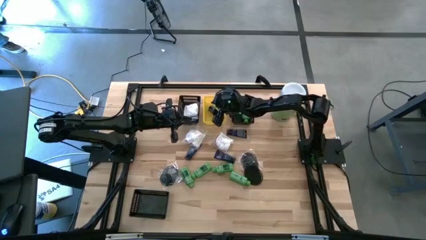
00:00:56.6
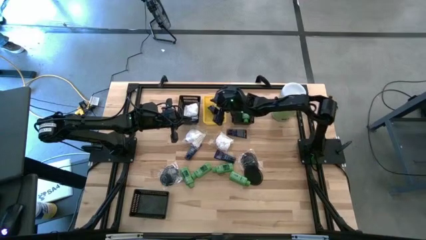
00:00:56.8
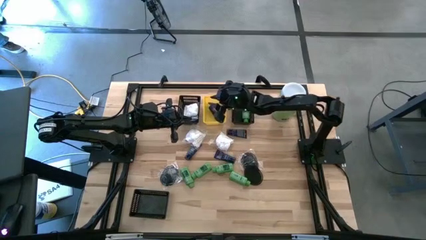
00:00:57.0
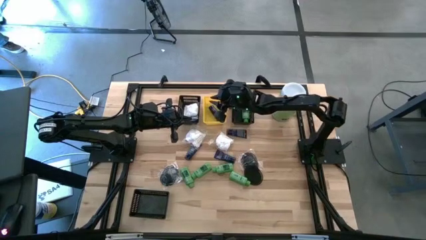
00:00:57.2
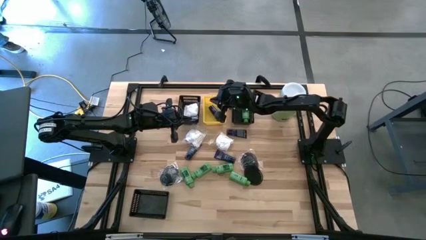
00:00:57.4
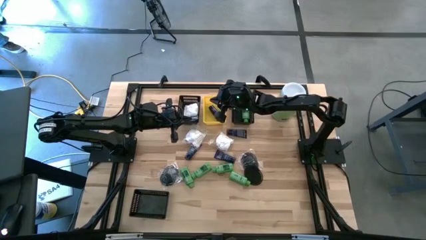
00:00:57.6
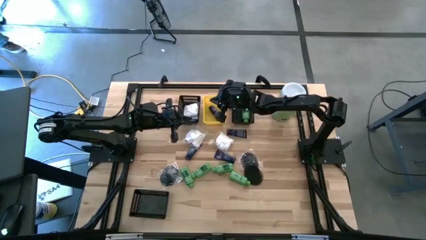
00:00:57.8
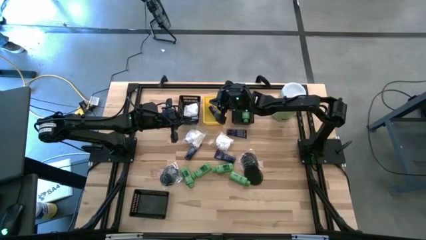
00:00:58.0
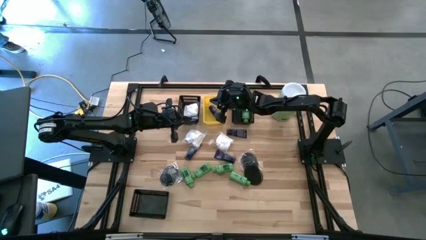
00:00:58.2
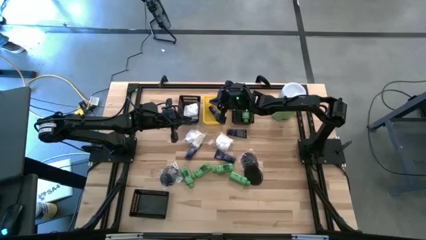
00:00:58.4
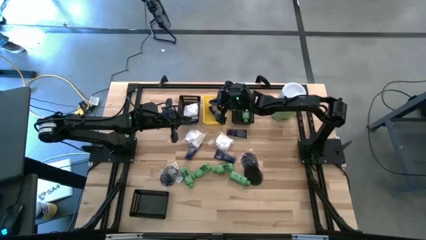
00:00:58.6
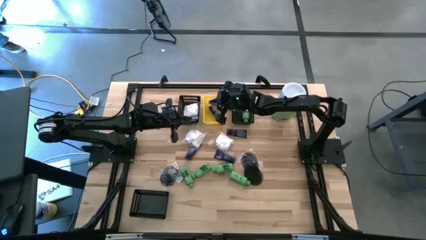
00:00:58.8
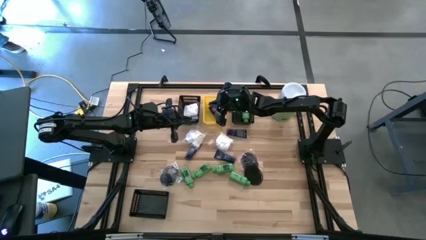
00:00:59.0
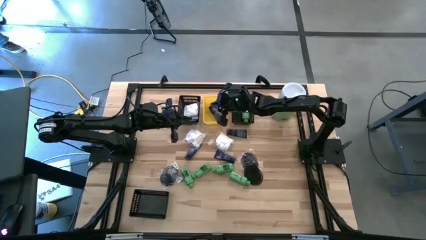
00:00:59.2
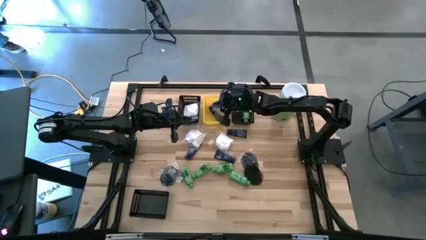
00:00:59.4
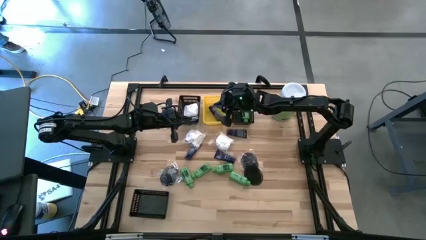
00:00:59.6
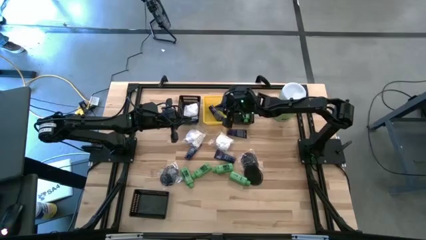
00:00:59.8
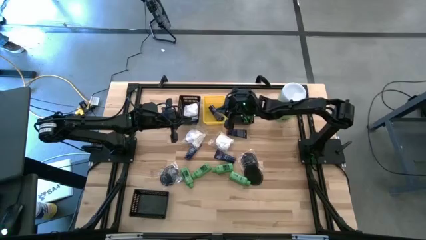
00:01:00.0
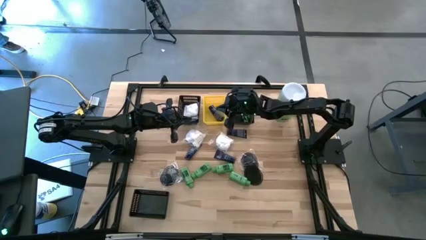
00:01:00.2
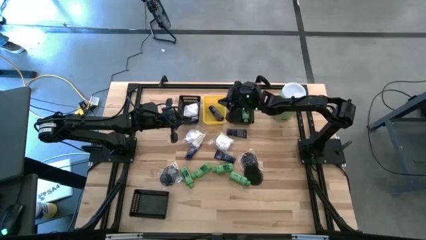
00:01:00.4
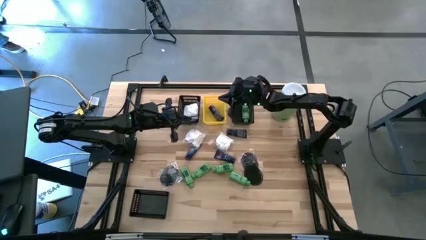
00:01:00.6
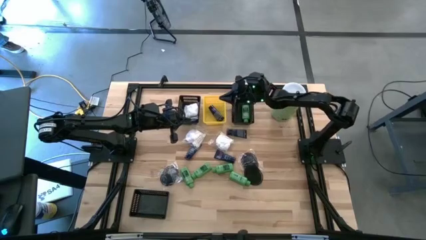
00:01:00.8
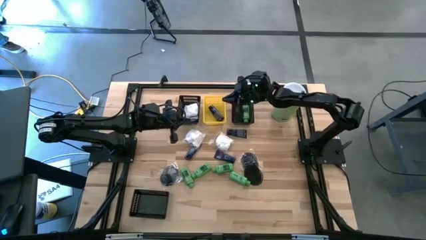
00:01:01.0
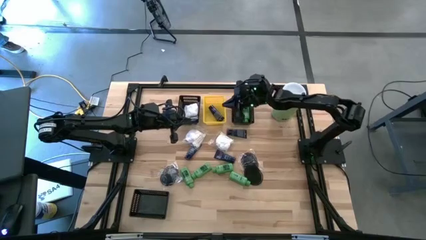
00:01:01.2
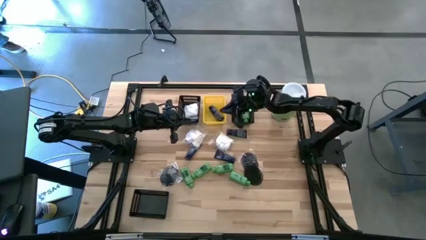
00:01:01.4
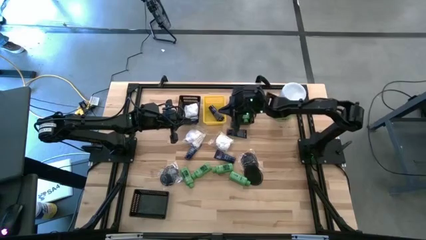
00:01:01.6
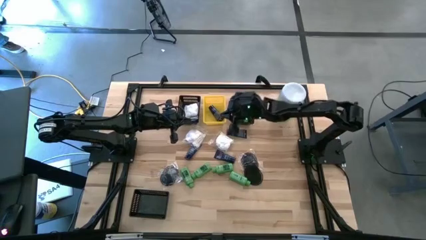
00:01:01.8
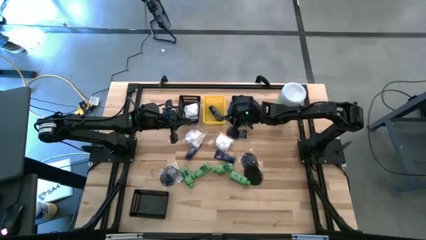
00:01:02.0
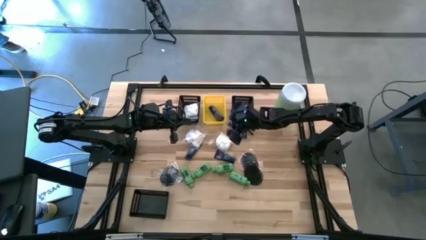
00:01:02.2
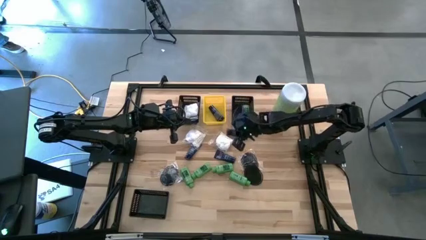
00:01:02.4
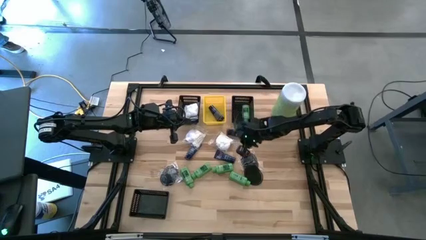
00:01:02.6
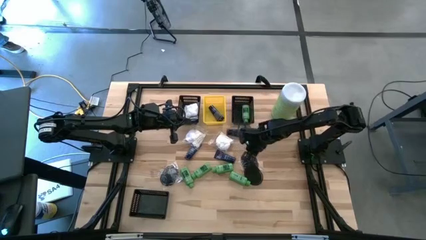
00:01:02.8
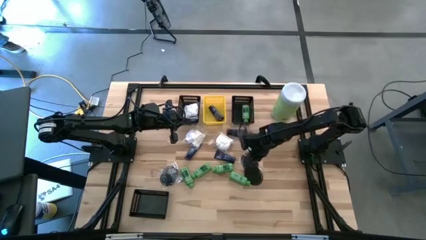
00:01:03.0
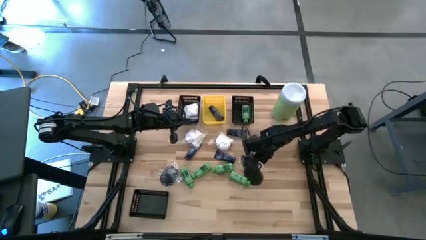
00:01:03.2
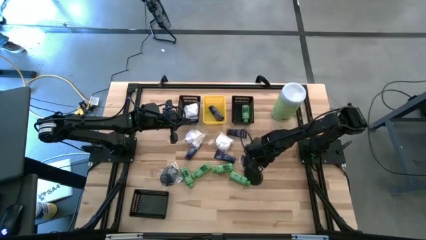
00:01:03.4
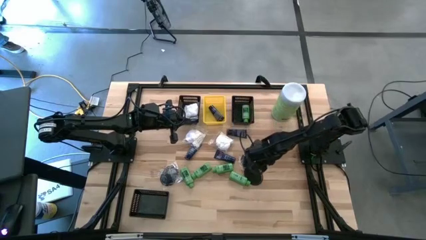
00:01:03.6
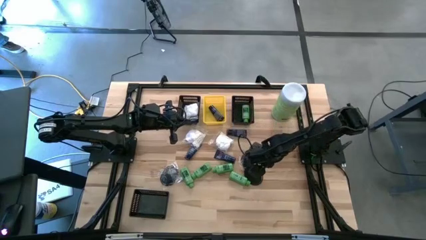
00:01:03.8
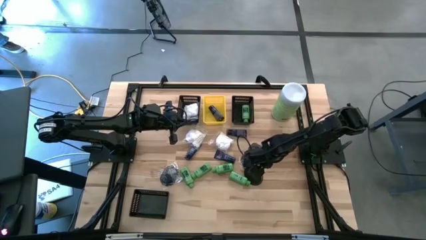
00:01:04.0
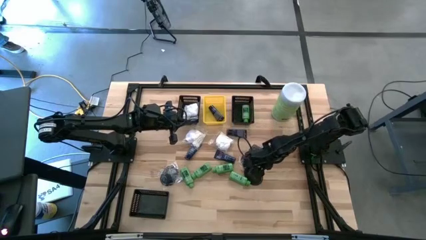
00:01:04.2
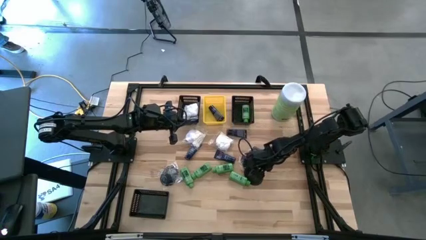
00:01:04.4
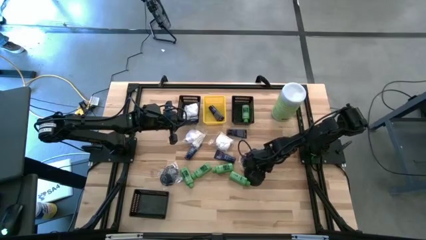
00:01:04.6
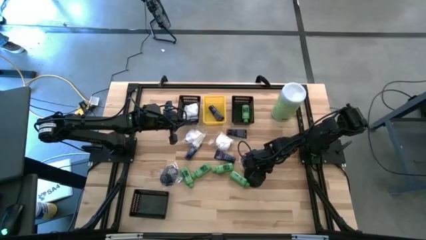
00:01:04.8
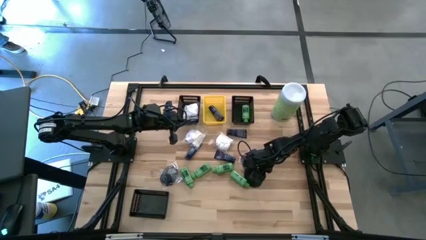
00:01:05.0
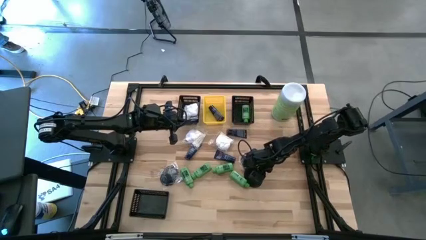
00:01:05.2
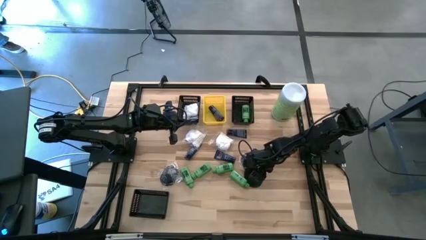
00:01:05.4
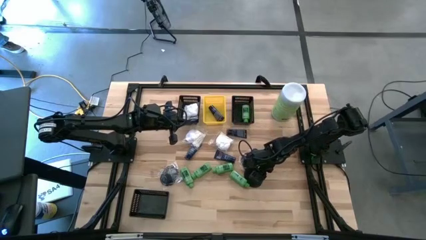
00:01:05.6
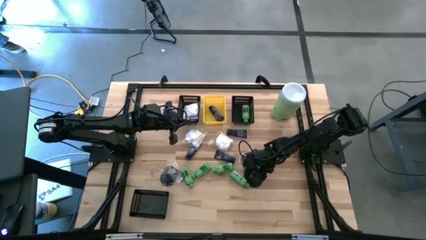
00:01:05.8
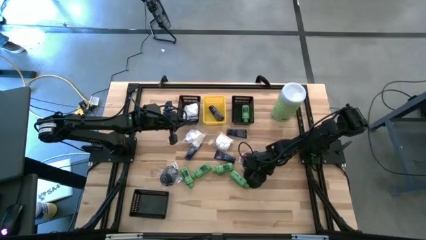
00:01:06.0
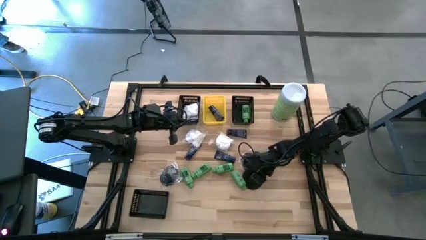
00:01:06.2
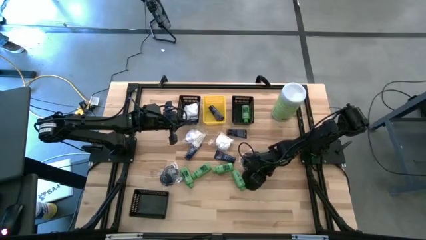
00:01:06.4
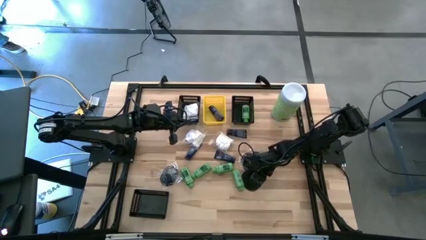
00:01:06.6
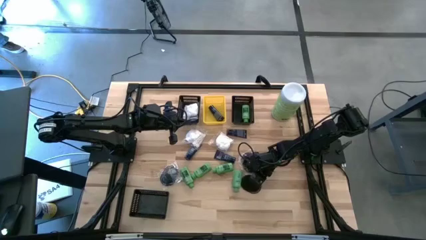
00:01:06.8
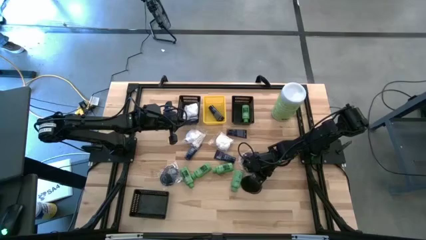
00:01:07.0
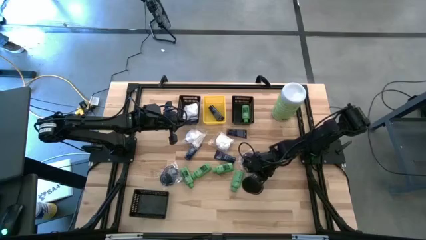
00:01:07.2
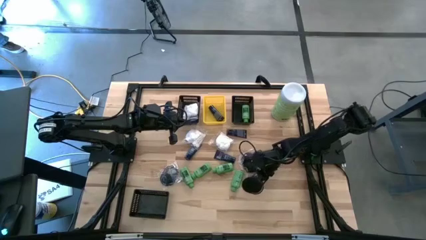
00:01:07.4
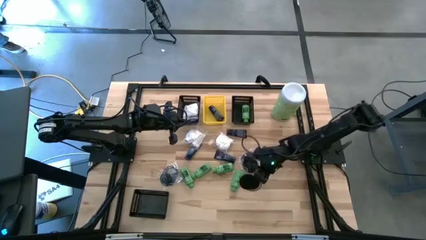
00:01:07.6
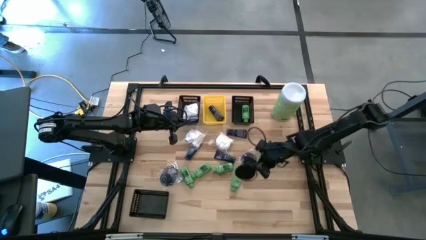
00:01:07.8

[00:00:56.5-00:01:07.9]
Task: Pick & Place Travel size toiletries
Put the black hairbrush into the bottom black bin
